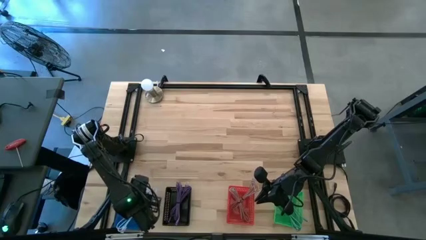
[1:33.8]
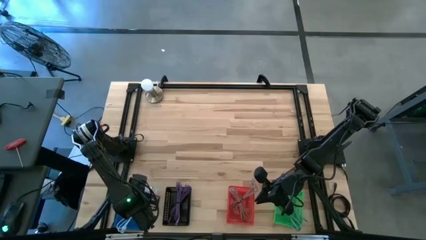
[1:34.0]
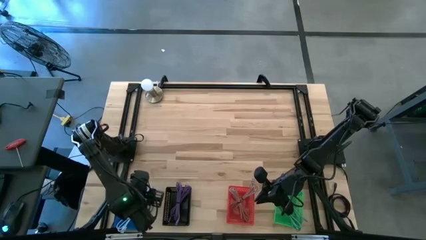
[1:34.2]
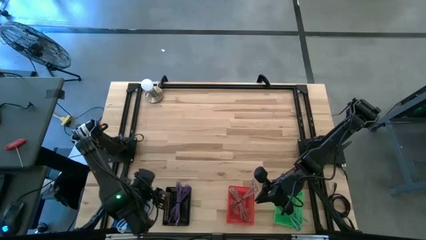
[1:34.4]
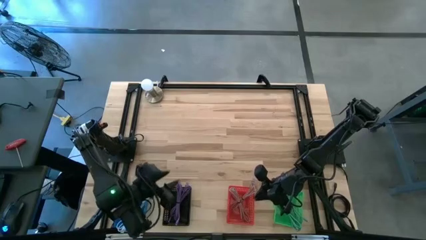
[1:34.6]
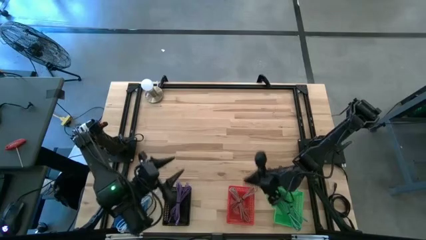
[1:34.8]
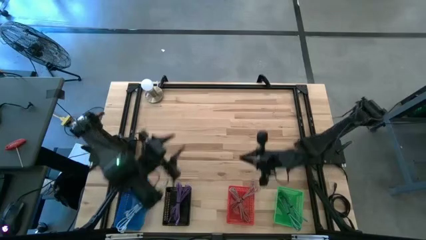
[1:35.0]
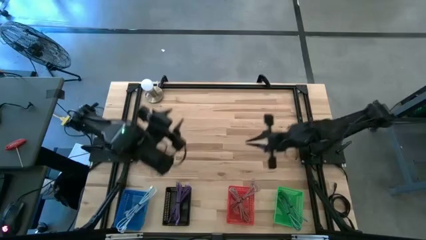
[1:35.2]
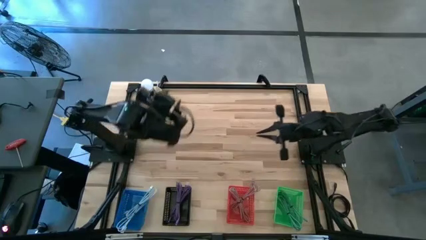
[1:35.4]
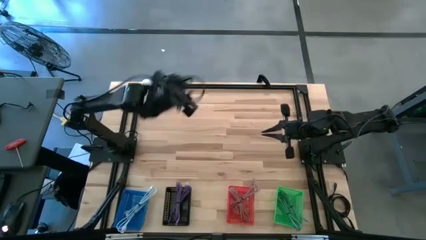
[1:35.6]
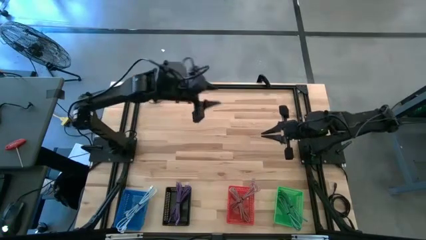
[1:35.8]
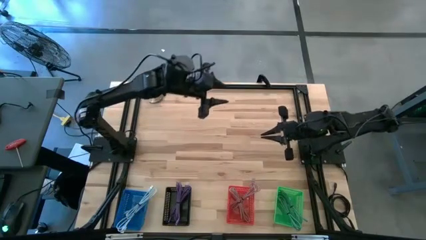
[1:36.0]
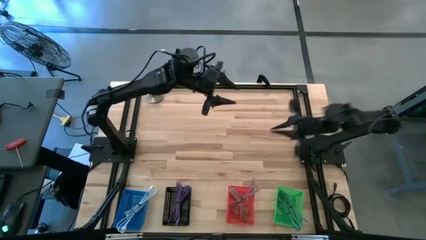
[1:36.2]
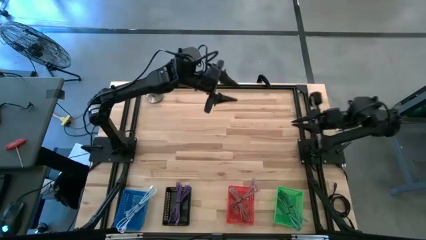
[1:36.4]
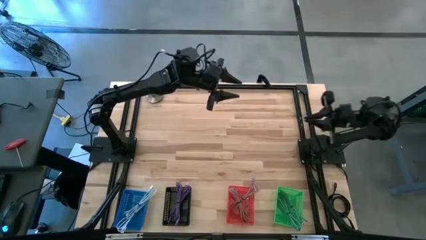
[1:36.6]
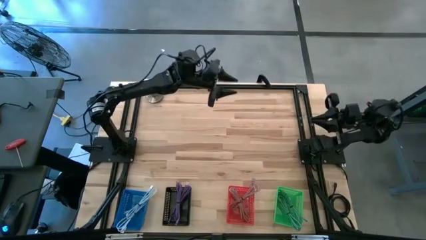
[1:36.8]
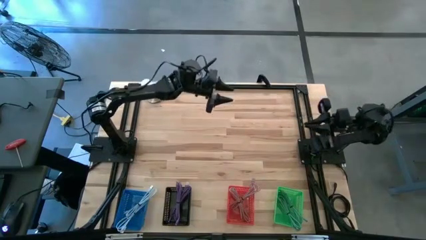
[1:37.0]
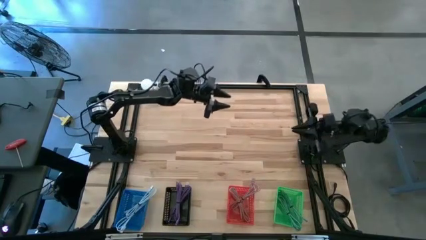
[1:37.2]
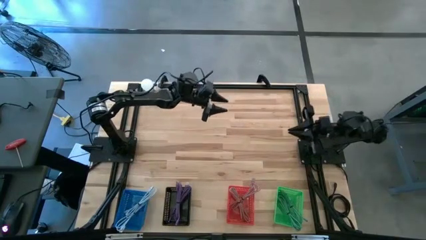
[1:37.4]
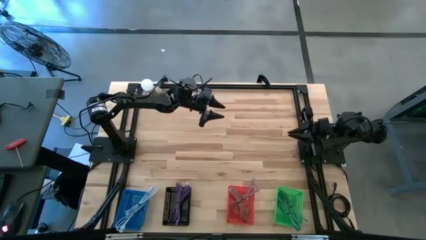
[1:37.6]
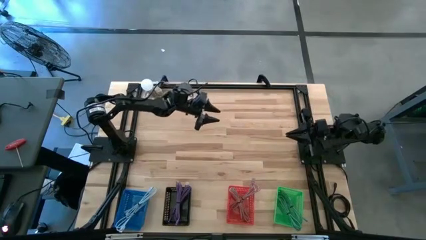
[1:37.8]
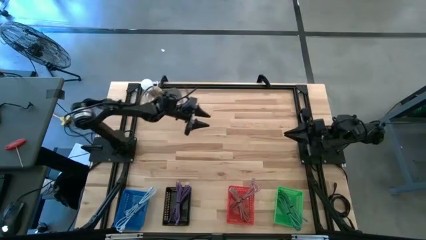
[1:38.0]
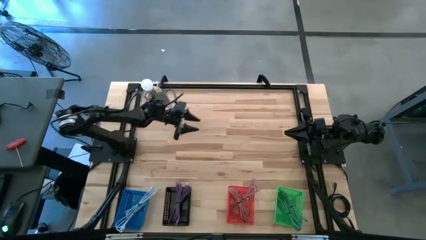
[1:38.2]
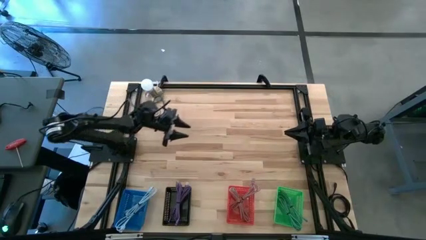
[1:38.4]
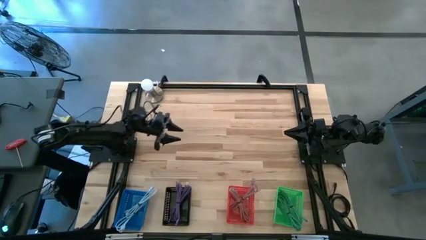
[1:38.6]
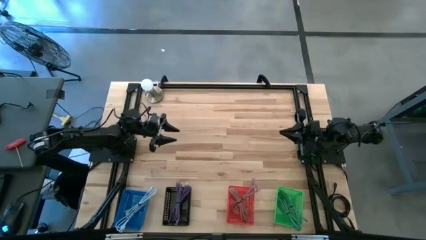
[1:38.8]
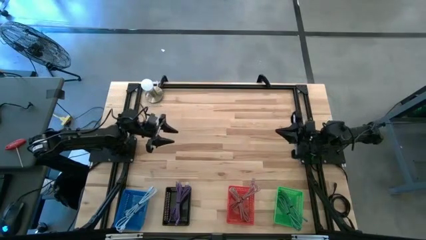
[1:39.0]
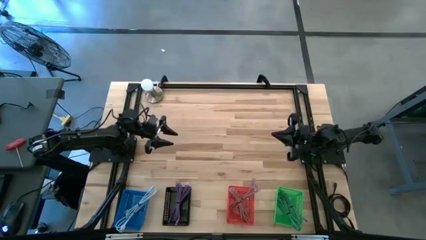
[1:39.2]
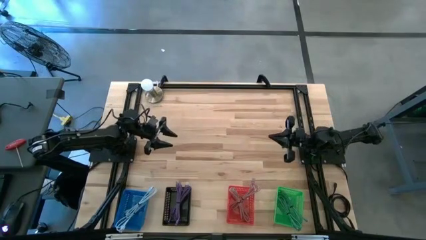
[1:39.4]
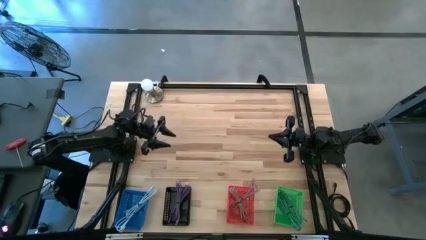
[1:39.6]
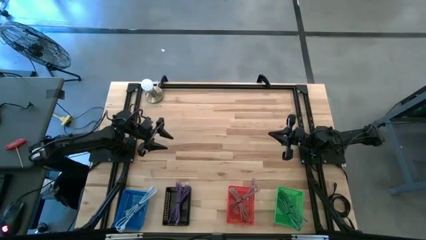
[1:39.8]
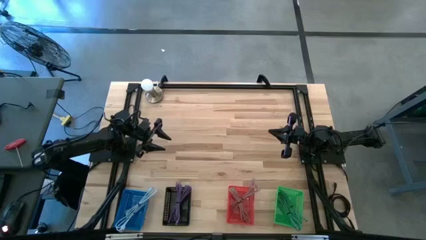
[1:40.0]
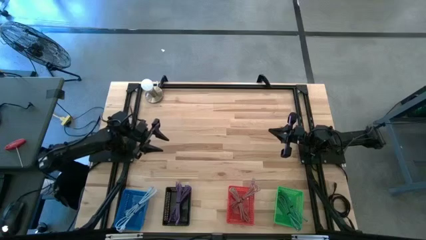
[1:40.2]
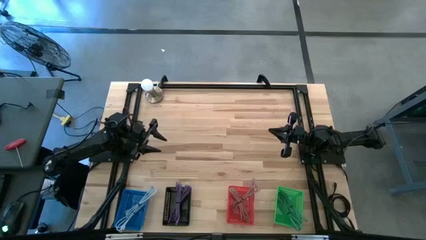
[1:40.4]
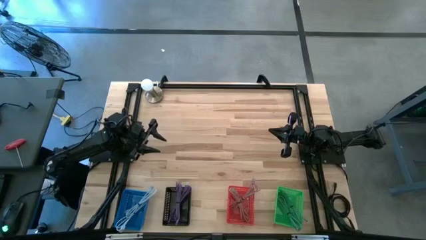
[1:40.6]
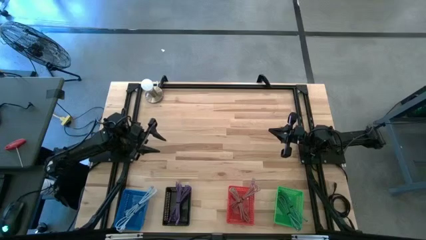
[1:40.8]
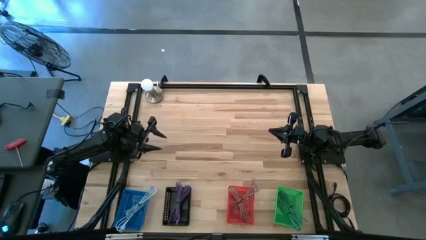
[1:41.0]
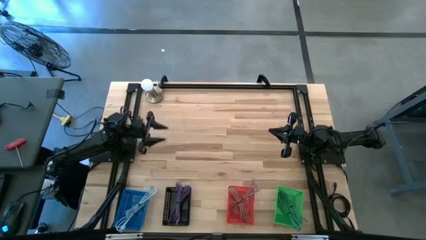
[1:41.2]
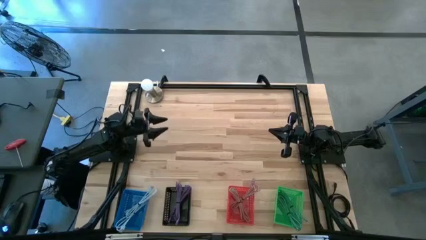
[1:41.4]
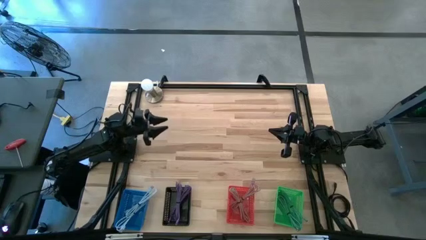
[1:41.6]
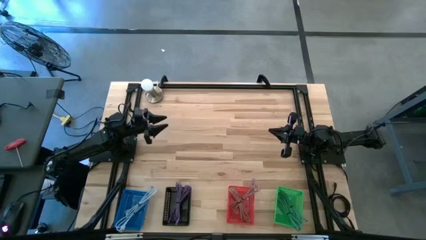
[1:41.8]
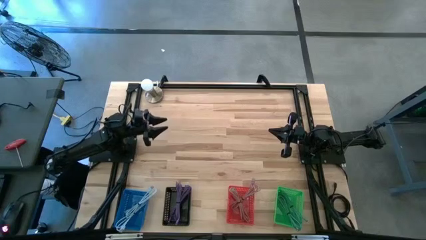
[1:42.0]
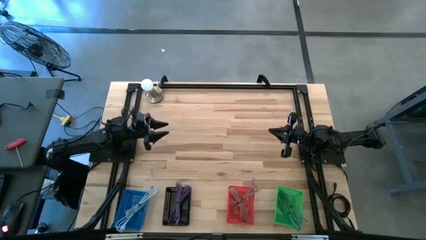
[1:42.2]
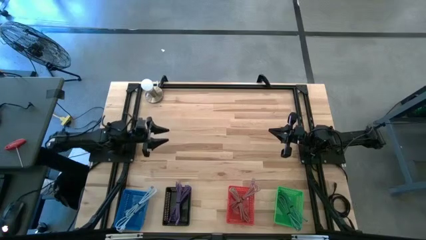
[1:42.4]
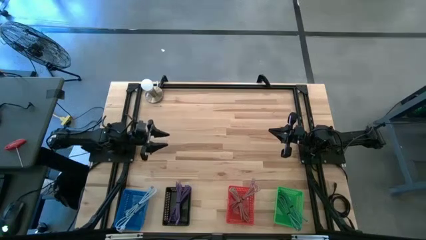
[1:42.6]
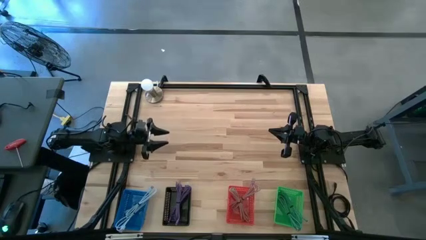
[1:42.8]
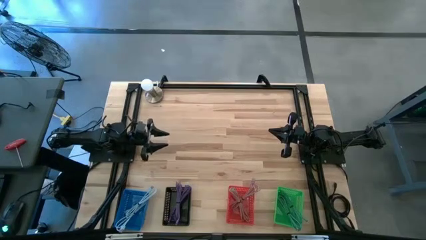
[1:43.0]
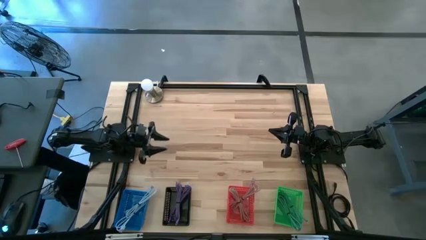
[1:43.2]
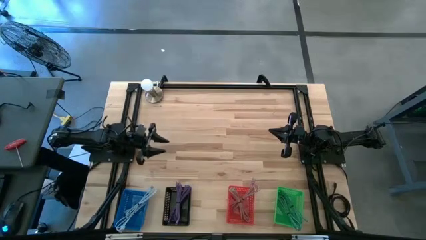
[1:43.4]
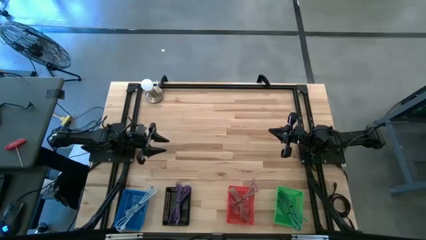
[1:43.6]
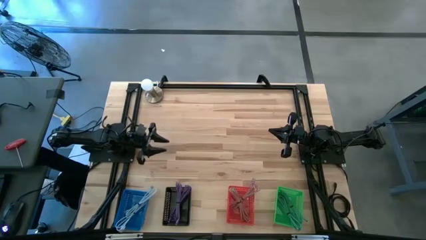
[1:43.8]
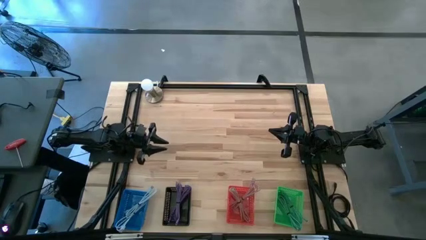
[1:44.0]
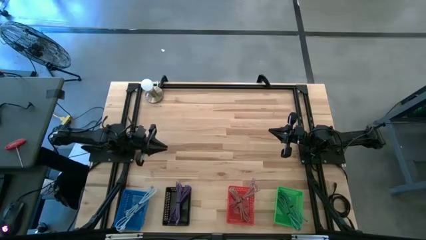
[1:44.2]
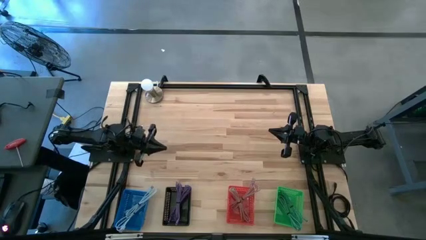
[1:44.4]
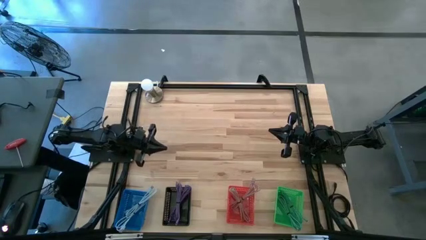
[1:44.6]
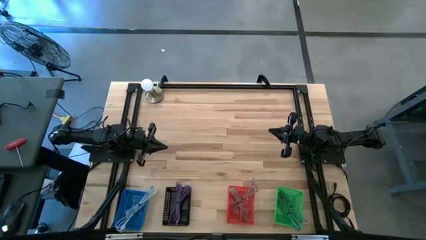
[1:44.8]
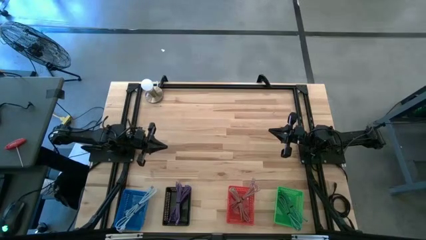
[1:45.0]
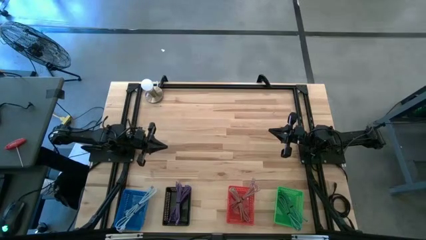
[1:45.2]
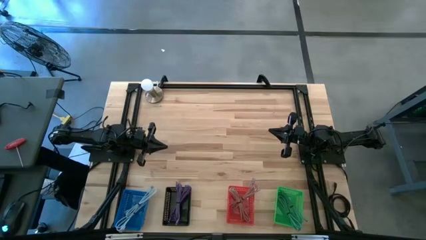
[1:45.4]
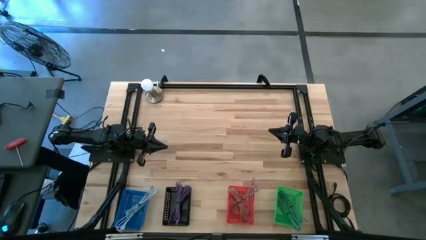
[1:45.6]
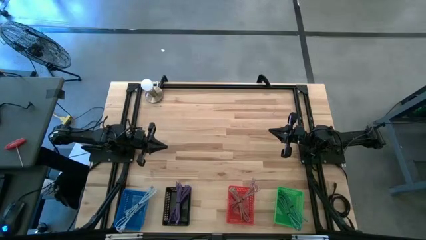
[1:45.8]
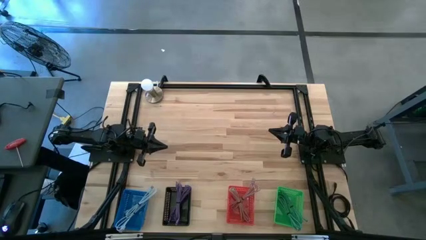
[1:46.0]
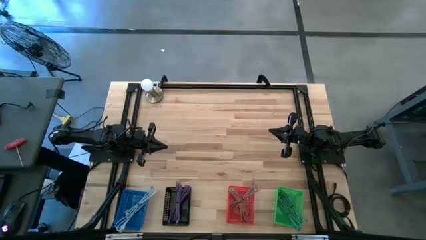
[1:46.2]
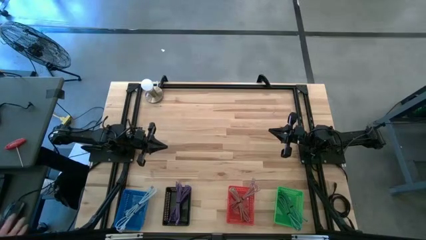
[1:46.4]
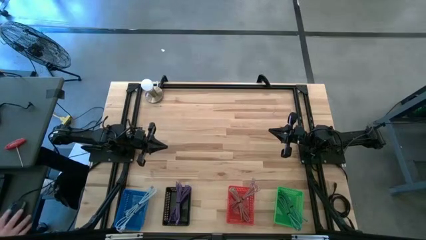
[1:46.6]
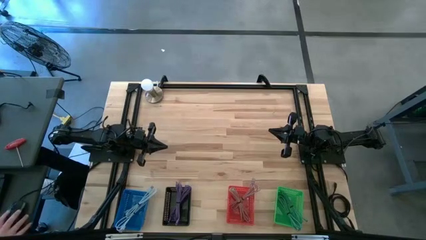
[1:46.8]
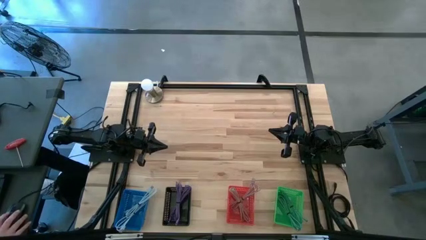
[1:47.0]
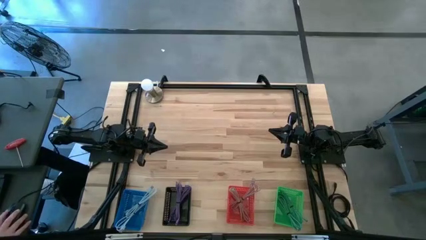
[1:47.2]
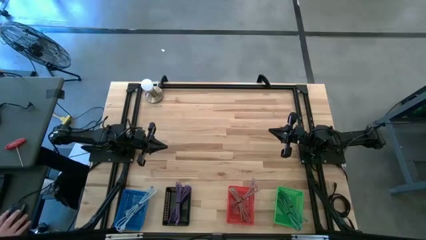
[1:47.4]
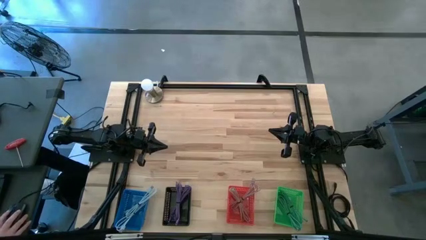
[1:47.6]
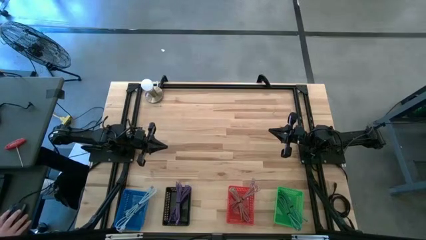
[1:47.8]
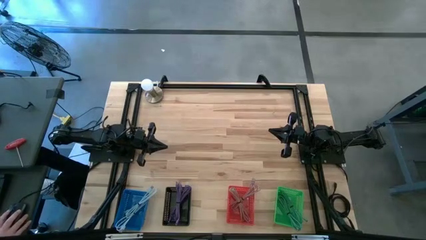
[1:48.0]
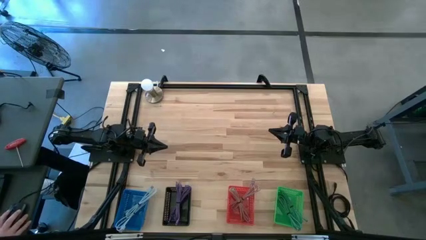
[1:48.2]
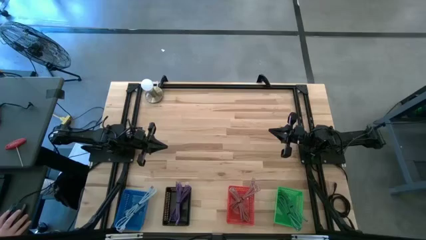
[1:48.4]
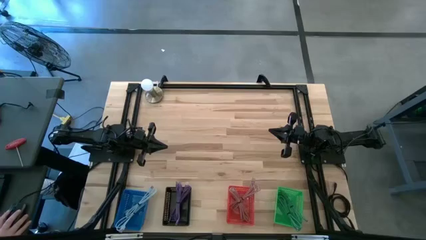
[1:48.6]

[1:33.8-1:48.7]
Task: Pick & Place USB Port
Return to Home Position

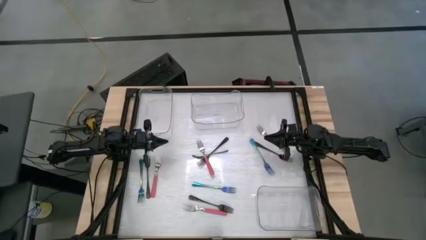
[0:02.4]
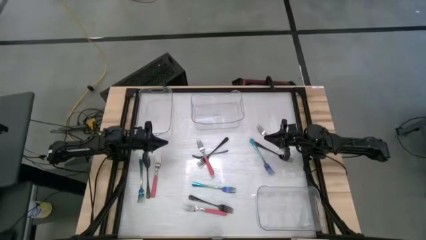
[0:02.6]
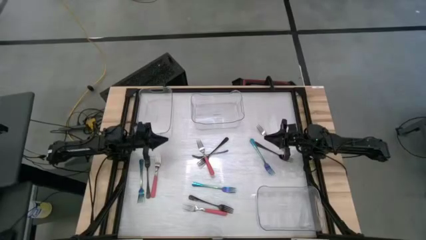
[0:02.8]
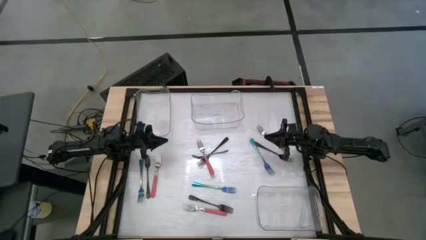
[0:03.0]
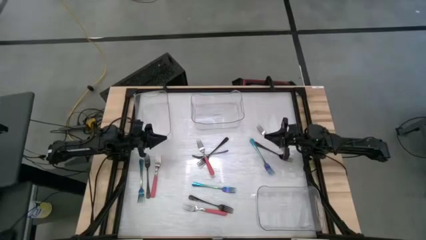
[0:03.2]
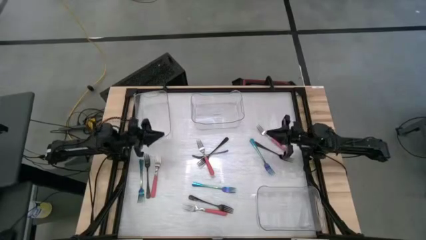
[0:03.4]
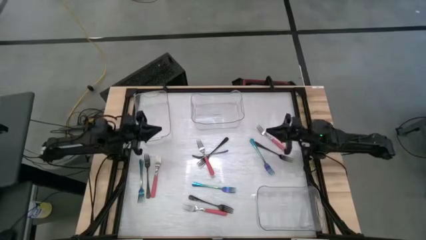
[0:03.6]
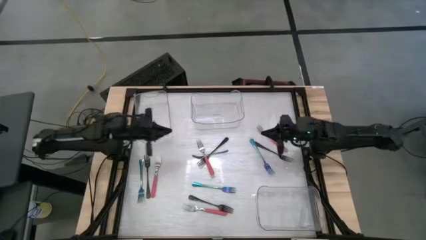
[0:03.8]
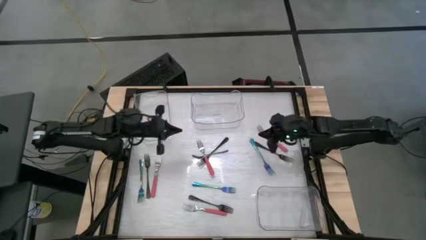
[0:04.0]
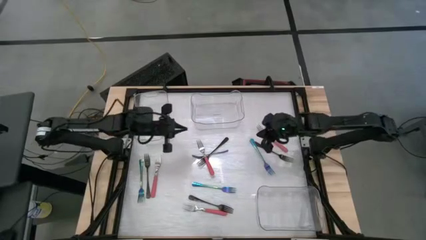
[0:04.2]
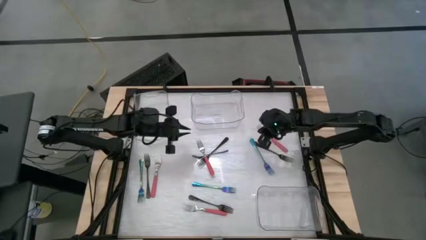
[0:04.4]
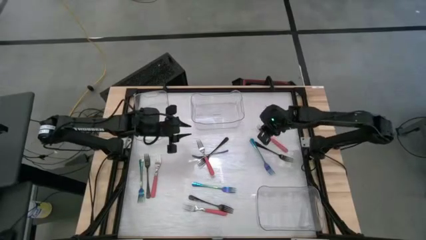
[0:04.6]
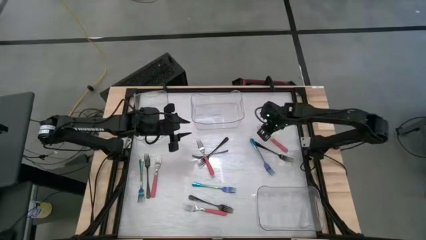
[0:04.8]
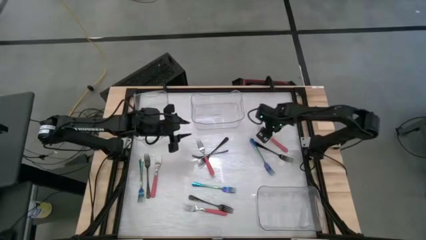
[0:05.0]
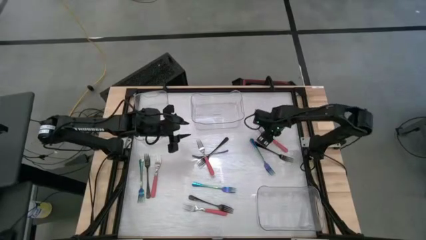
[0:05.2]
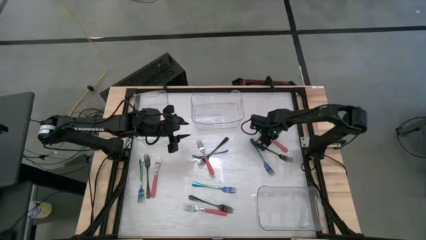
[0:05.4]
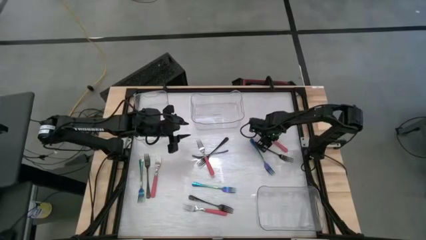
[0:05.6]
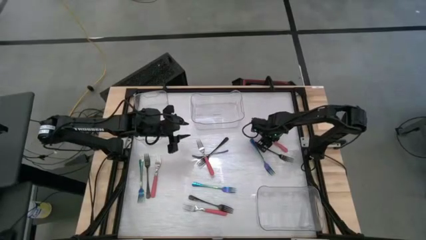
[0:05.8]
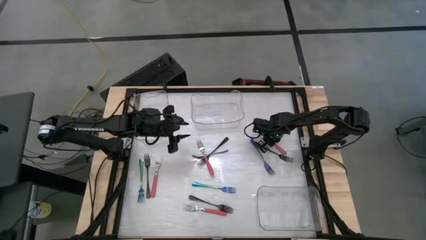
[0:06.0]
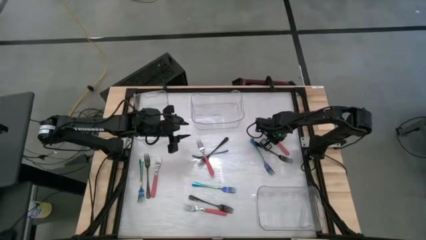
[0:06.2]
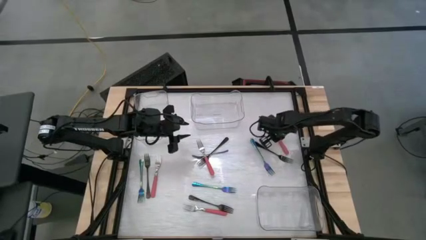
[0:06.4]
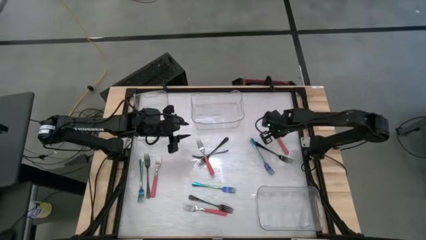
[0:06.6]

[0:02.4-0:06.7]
Task: Sort silverware by color (type)
Put the pink fork into the bottom right transparent bin
